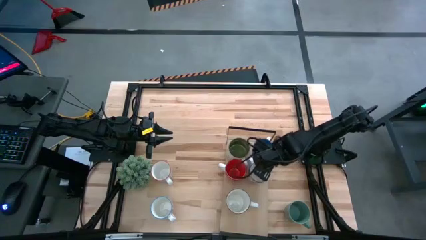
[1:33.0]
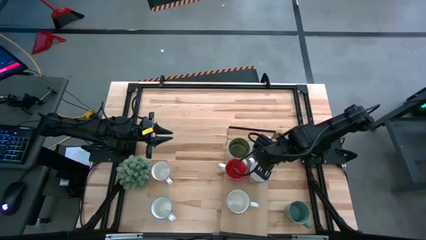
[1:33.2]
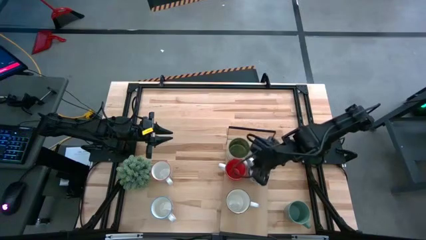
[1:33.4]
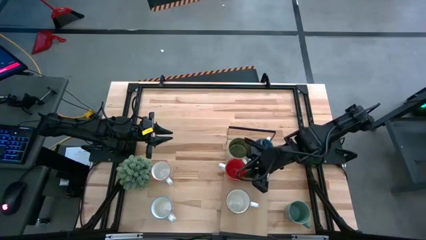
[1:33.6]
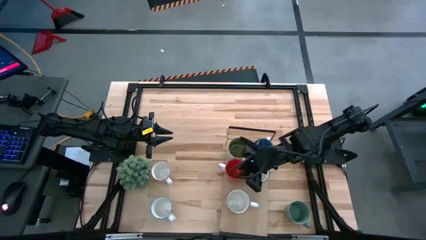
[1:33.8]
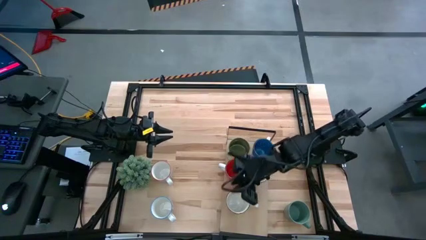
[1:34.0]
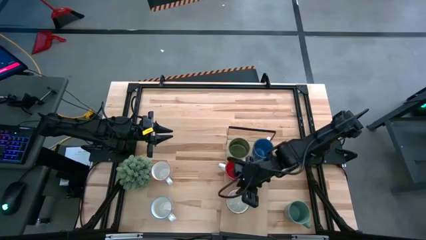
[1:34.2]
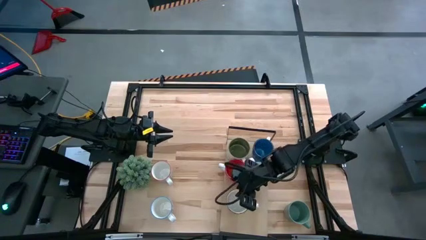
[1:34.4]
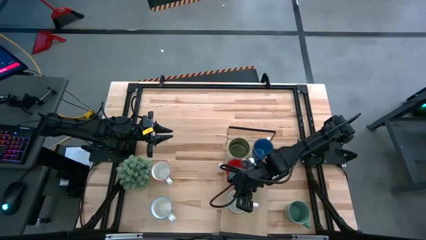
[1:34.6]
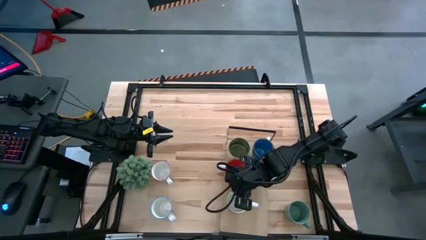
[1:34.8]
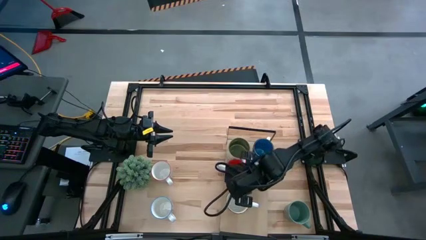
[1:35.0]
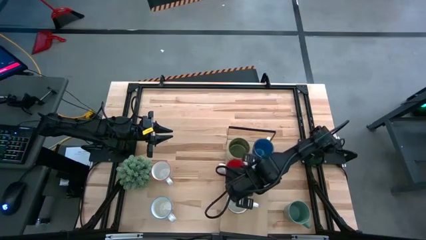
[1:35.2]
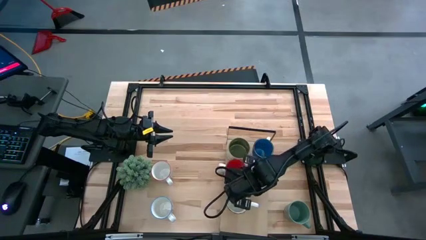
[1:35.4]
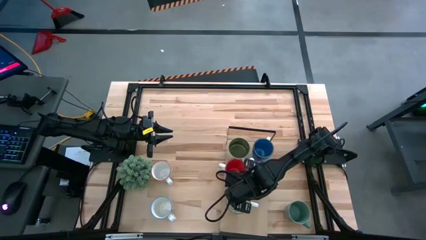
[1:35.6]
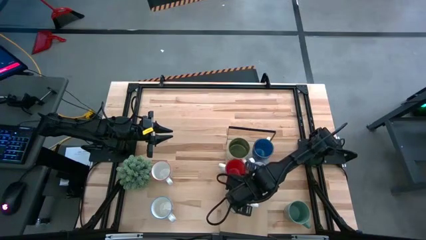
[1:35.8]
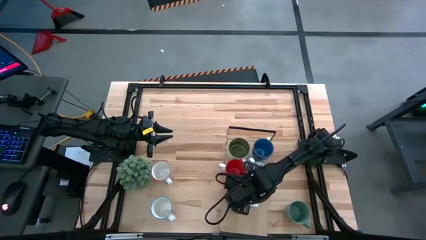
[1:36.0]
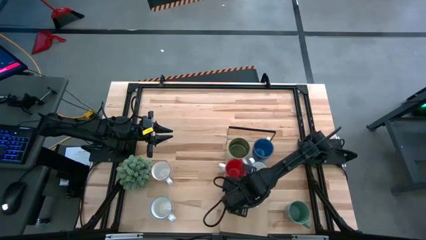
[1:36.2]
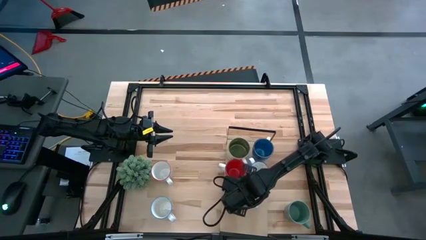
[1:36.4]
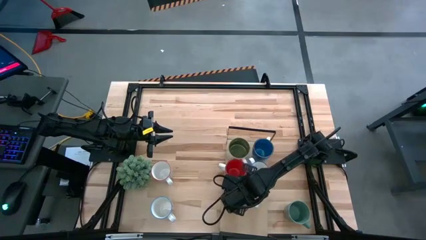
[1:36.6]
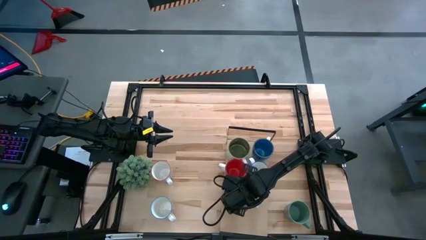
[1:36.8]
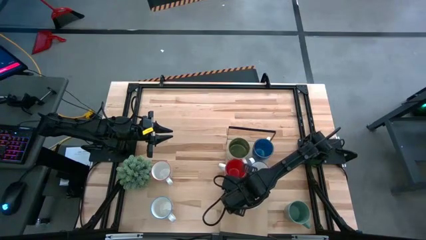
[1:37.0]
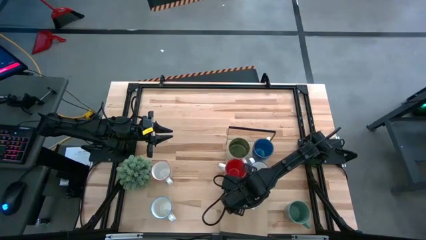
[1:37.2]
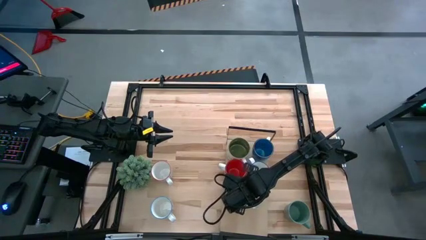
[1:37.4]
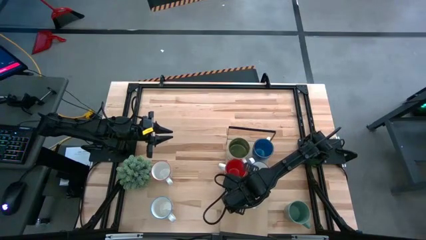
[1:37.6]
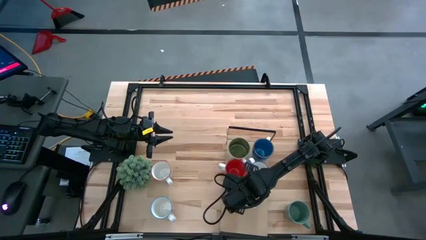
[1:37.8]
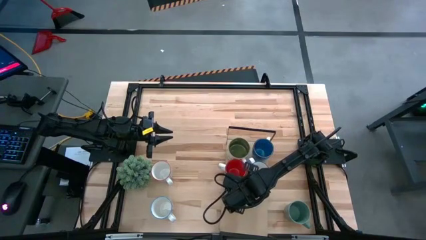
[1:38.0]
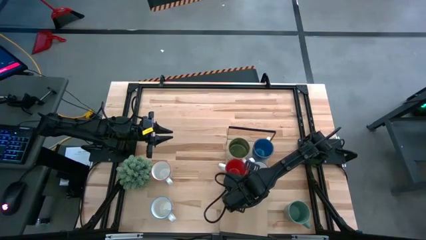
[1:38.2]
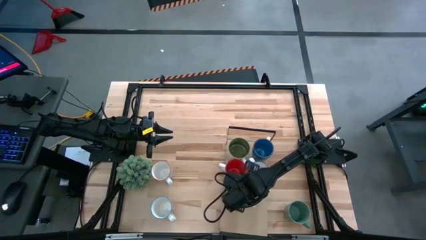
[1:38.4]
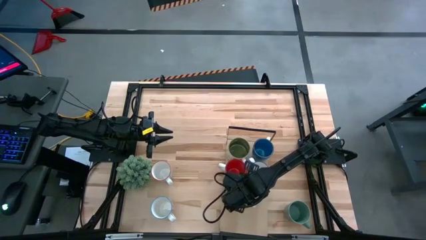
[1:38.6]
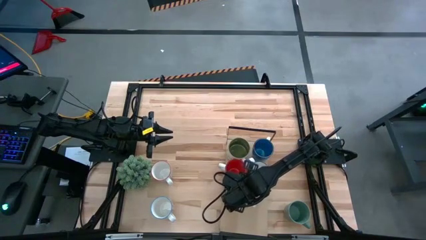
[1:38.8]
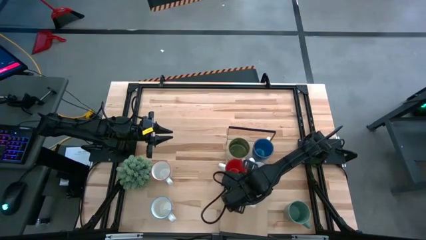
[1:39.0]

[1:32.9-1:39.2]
Task: Place coffee mugs
Adjust the yellow mug on the shelf

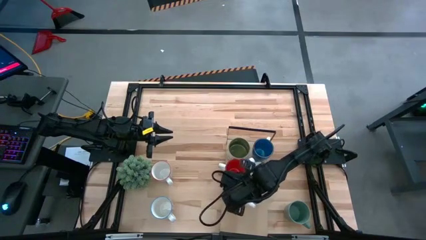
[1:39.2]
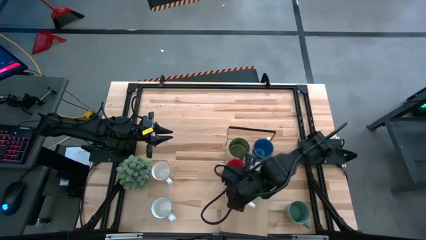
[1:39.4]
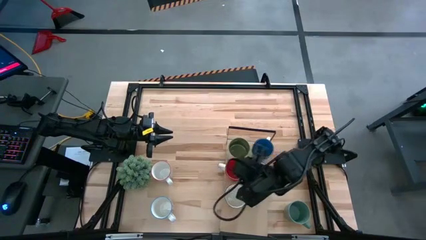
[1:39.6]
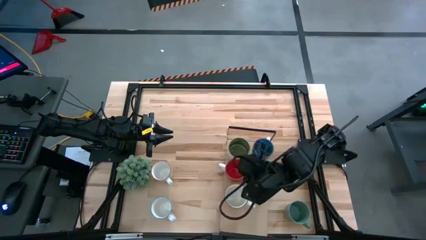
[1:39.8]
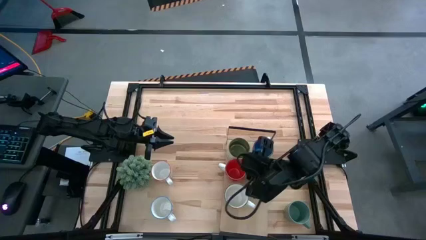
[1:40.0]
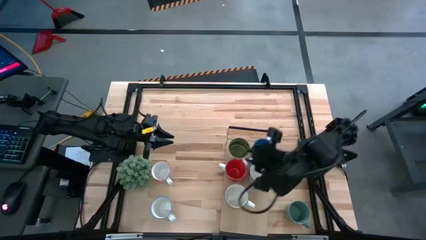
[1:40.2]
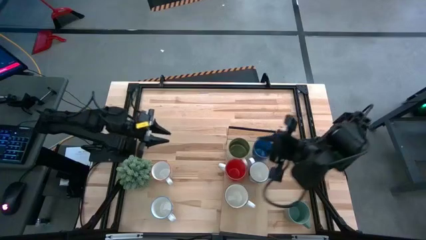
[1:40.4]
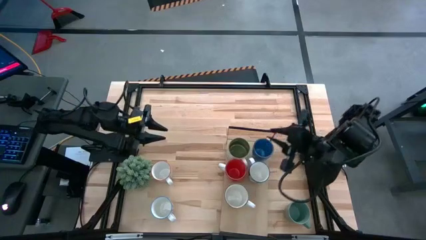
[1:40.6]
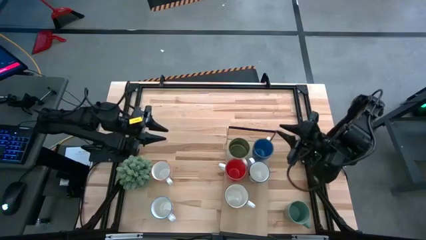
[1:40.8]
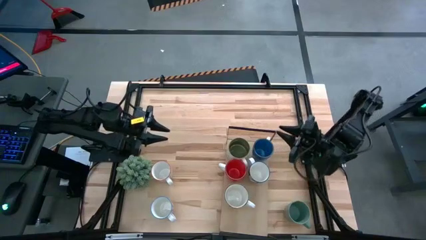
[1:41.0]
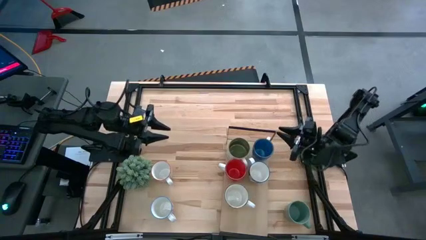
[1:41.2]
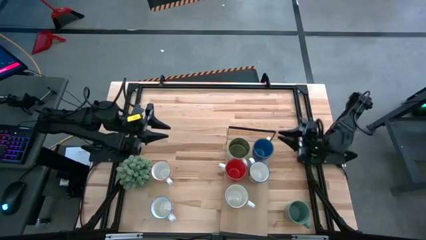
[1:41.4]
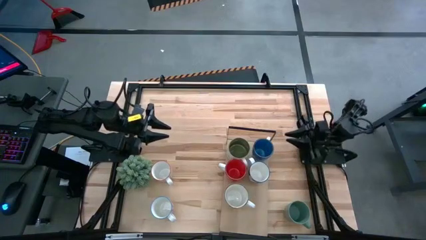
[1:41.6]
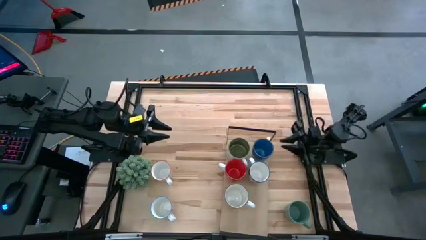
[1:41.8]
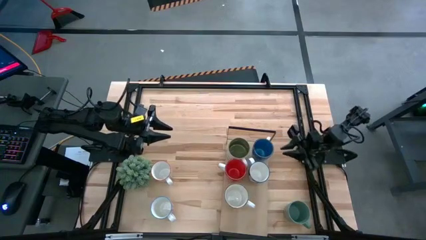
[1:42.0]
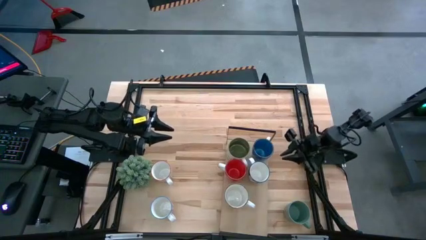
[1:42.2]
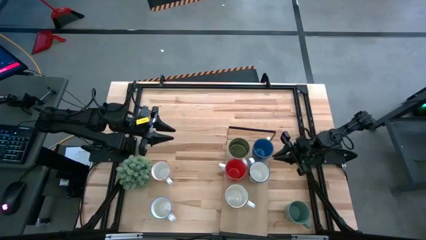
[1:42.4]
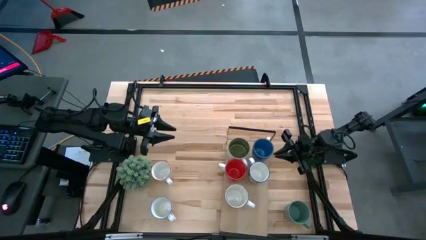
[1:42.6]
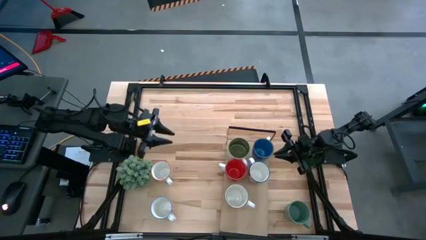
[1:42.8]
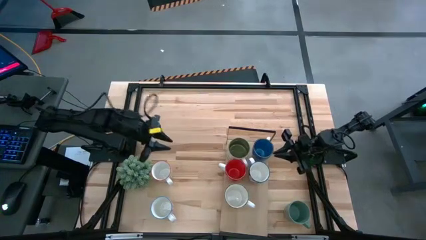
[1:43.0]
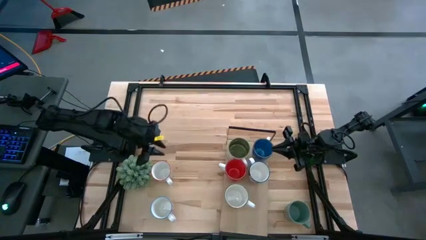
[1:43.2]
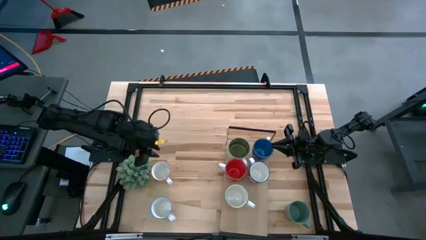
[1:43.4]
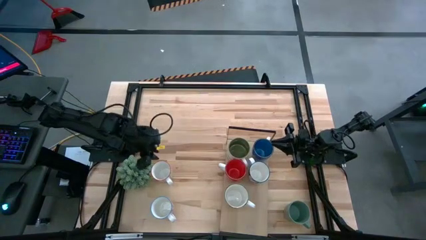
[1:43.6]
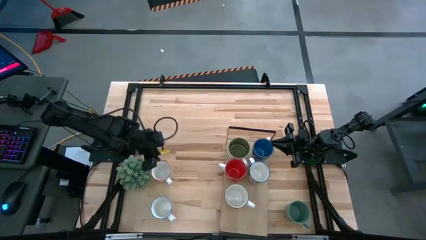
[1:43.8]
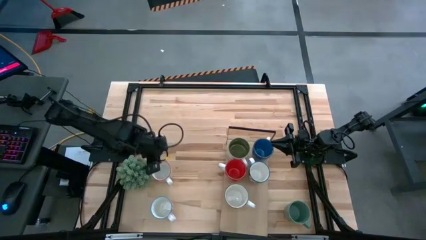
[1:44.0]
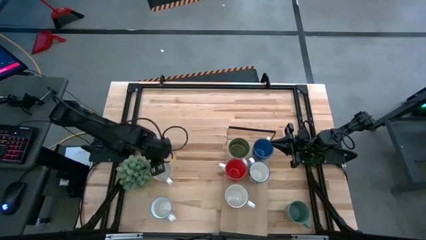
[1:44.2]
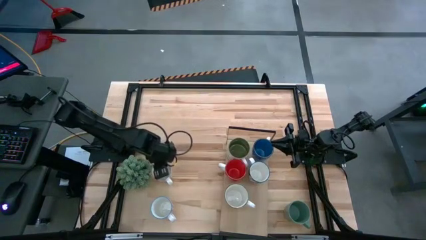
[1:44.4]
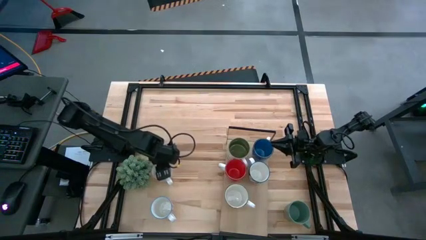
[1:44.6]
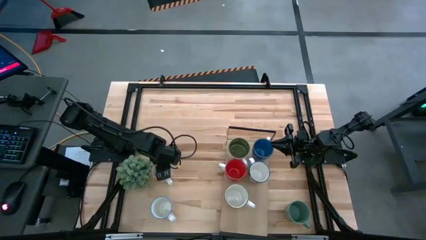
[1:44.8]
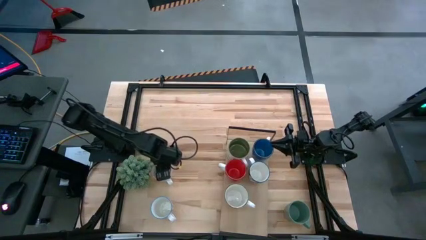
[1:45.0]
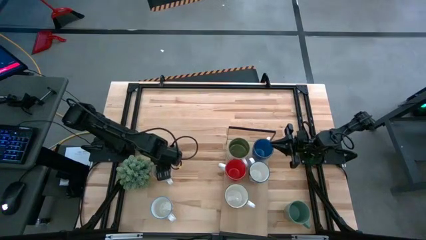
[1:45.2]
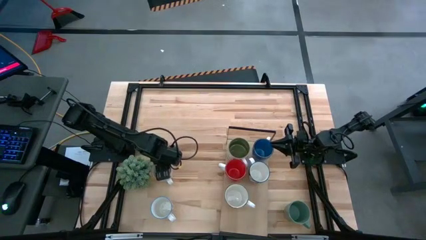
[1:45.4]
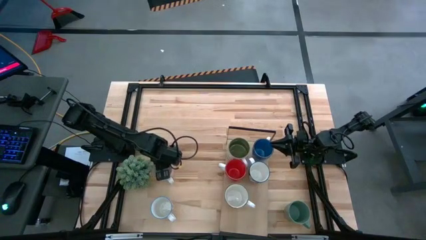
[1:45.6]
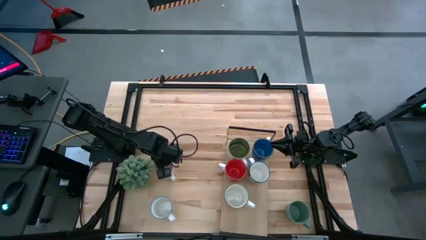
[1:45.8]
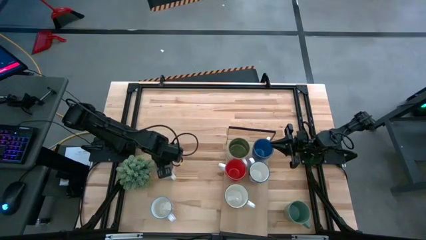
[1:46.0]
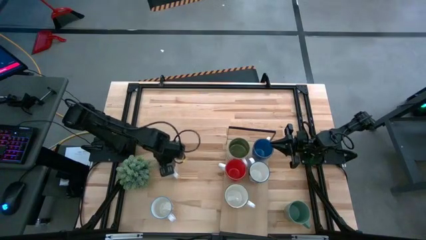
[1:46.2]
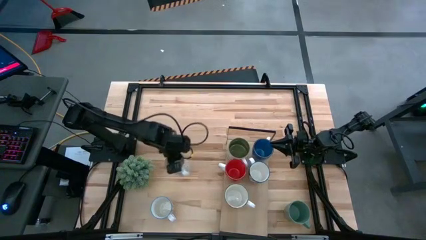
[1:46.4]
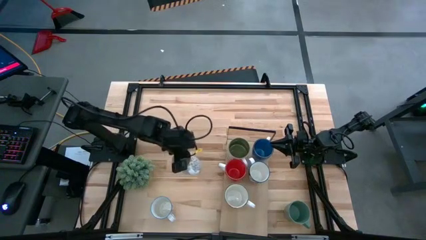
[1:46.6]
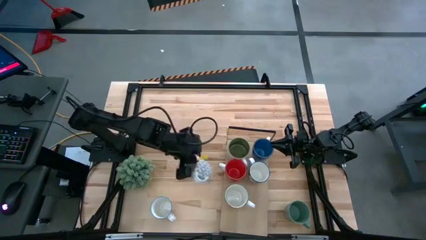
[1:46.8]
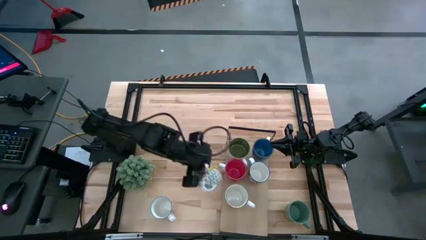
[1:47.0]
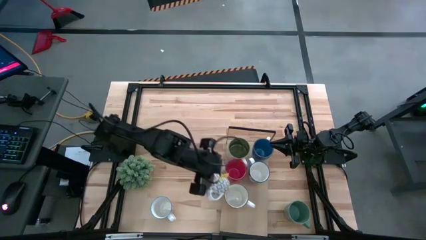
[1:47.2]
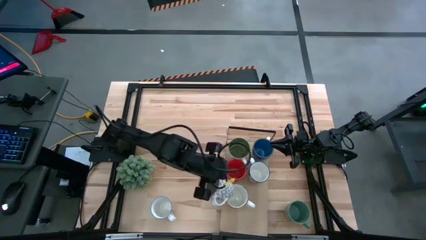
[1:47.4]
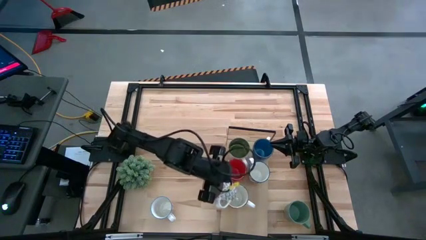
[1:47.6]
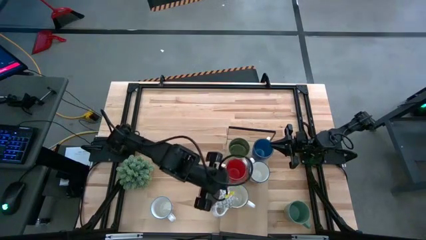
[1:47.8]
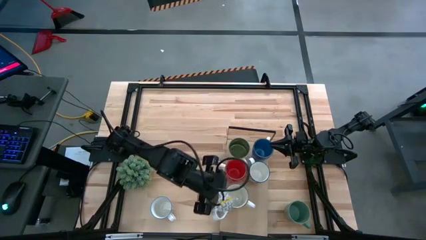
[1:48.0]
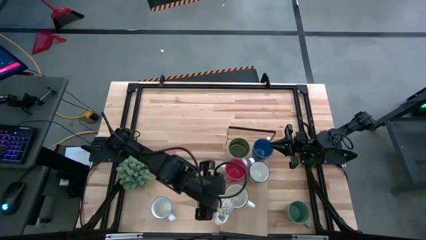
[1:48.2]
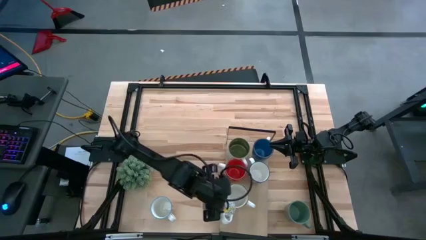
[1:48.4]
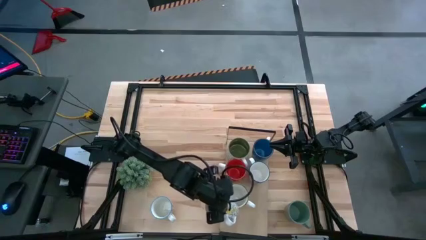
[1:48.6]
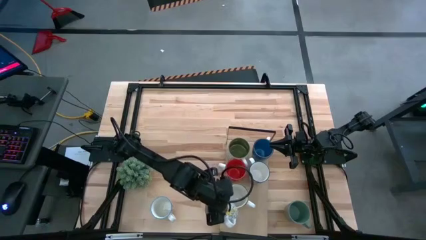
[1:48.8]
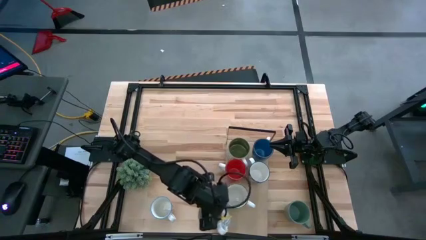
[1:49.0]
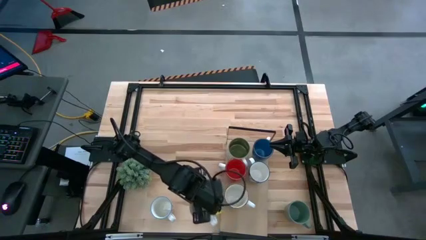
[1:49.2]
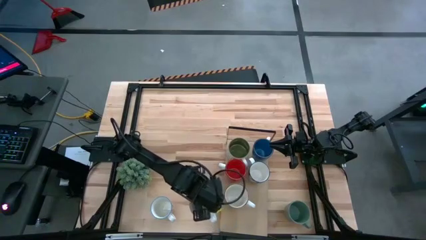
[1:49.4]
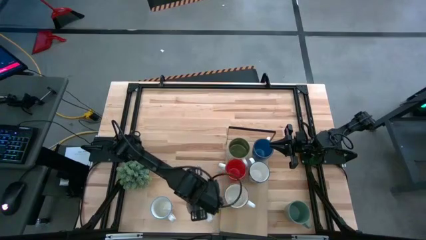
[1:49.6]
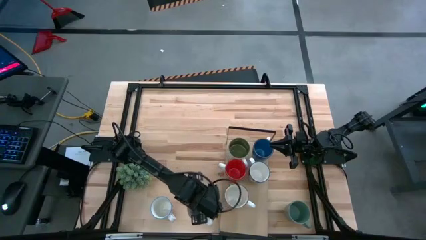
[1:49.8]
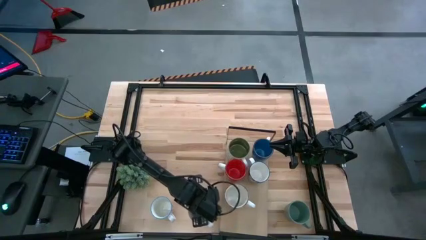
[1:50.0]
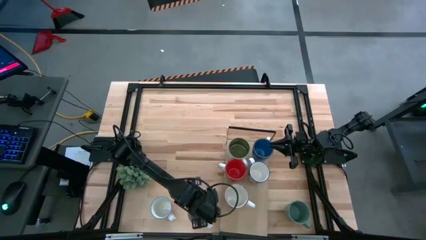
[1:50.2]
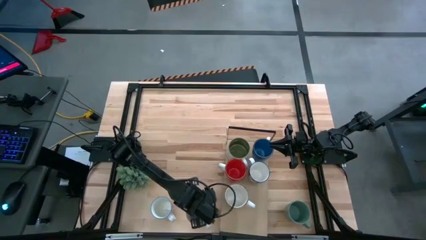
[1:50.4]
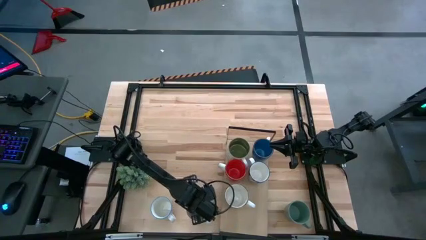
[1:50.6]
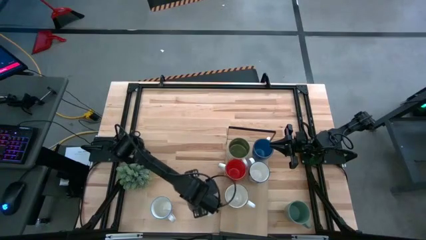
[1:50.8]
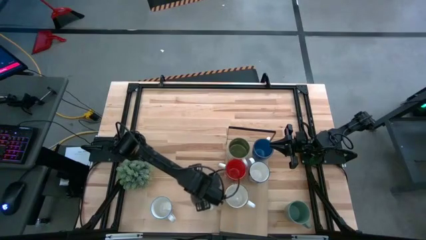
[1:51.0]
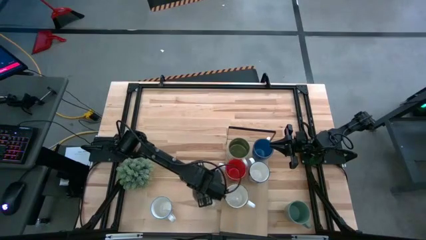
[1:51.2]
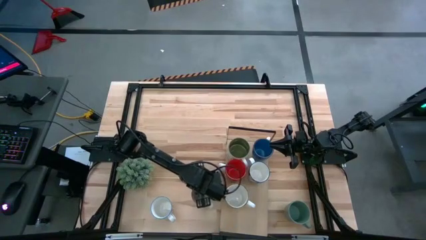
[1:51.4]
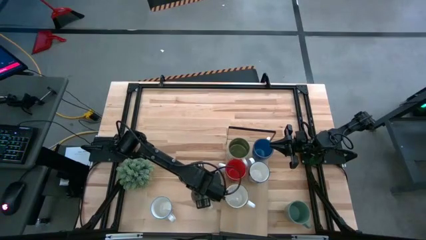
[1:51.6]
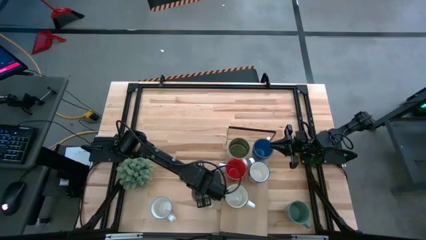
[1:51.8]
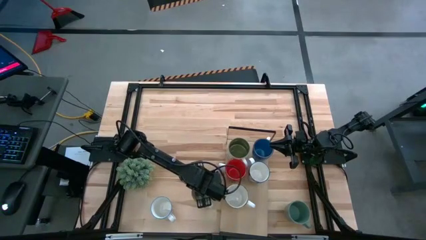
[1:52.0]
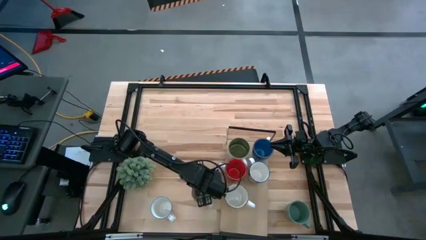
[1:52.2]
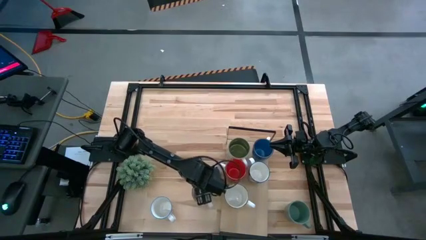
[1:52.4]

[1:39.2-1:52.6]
Move the gray and white mug to the lower middle of the table
